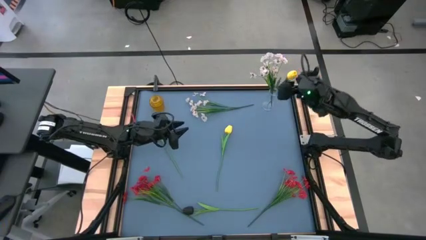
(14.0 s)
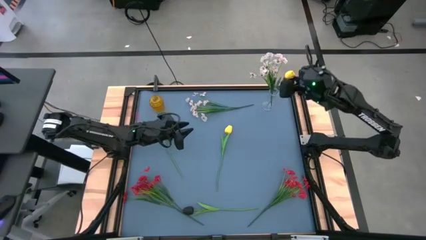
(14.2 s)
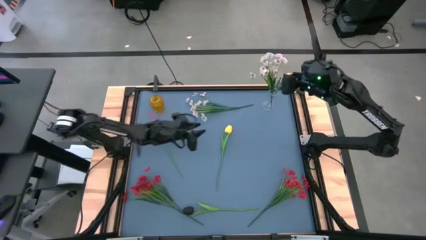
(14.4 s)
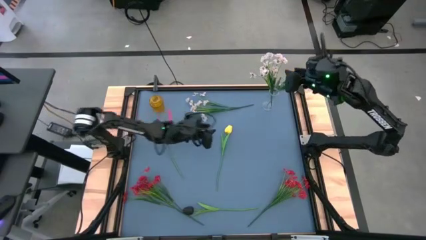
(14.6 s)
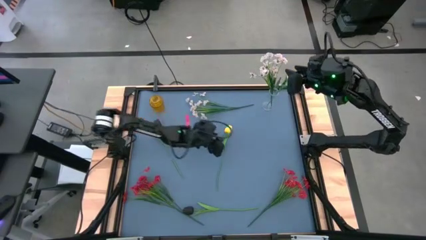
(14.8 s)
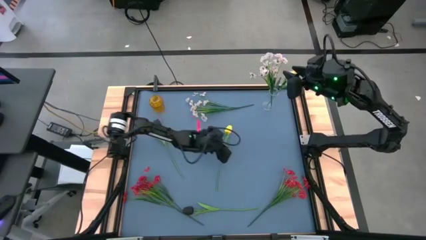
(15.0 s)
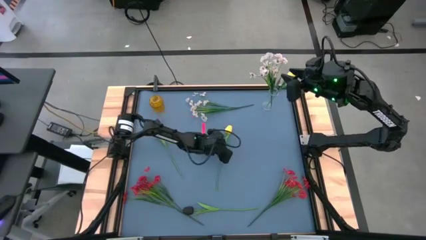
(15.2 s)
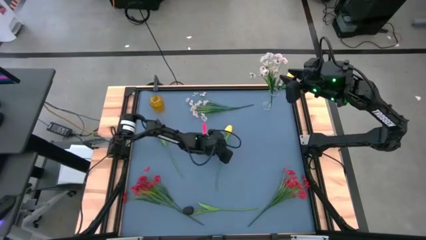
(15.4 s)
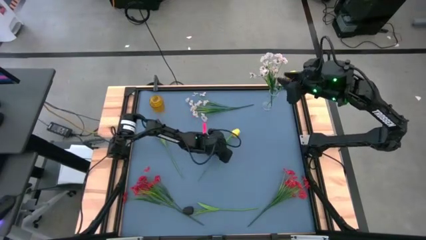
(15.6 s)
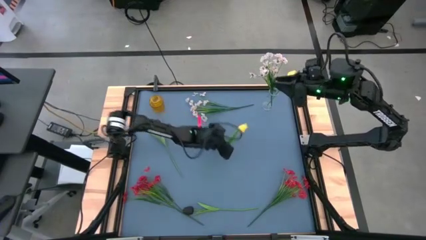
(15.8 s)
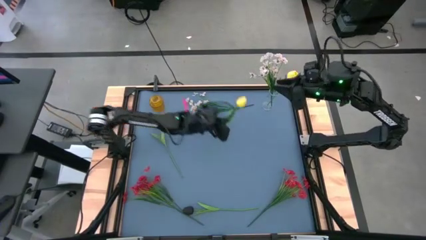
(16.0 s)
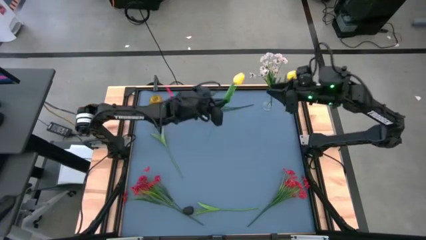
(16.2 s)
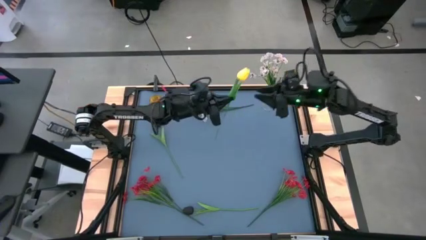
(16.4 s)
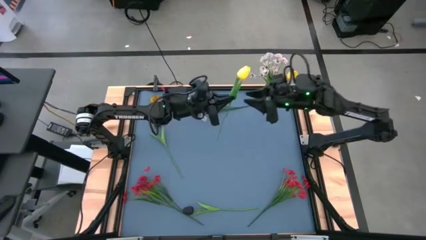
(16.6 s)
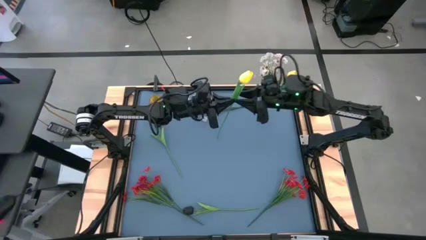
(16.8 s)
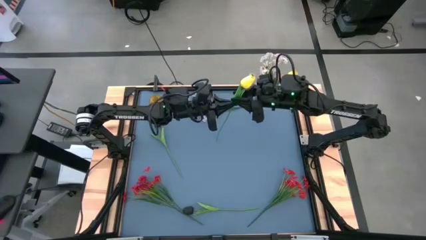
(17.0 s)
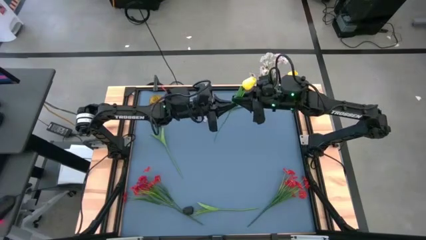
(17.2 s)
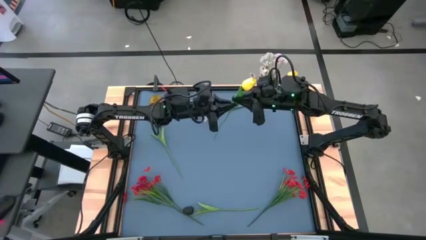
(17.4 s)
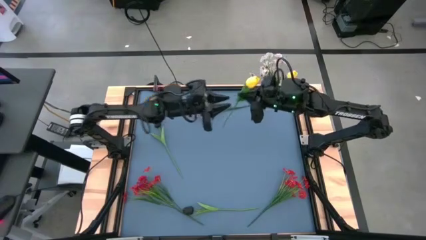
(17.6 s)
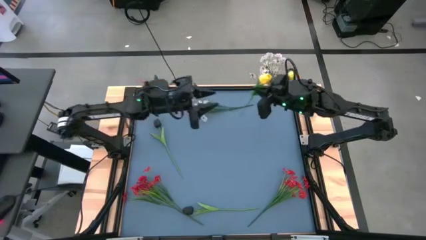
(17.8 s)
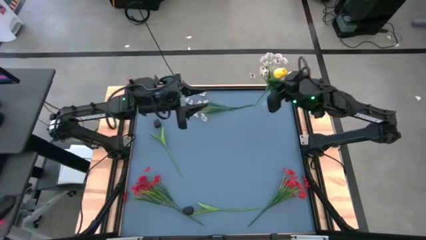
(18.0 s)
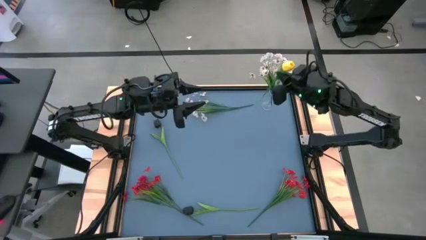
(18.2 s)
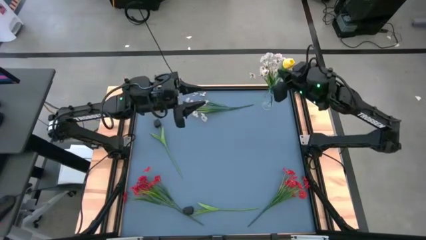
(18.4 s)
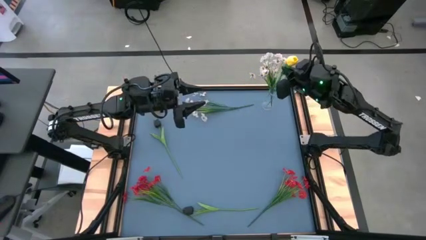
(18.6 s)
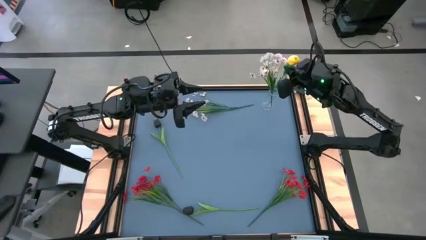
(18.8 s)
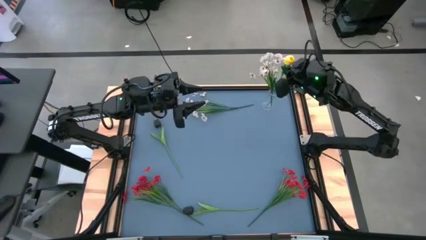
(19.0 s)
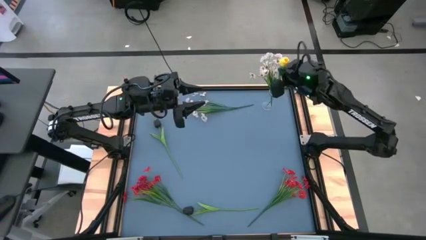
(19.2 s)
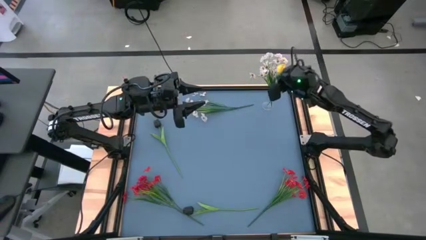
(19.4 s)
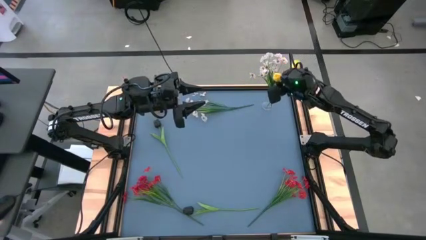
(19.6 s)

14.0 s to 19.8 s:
Task: Sort flowers into vase by color
Put the yellow tulip into the transparent vase

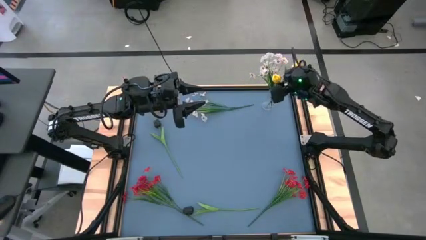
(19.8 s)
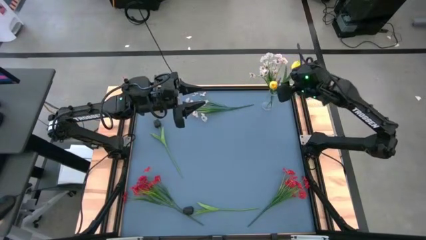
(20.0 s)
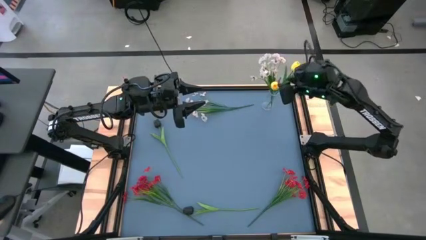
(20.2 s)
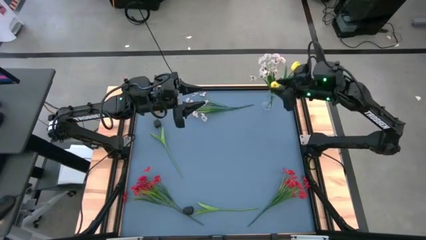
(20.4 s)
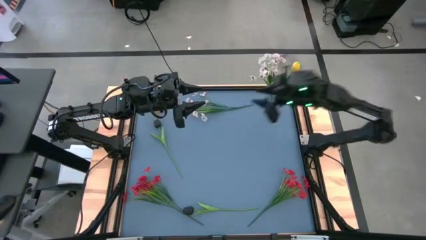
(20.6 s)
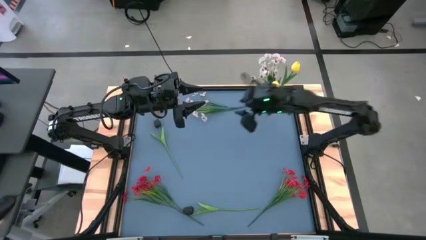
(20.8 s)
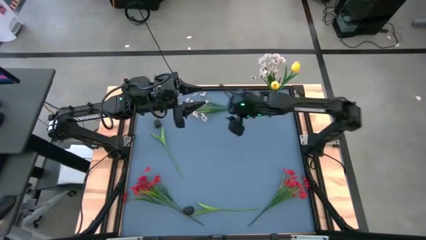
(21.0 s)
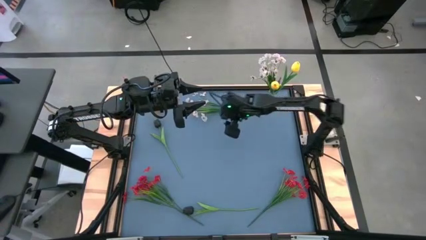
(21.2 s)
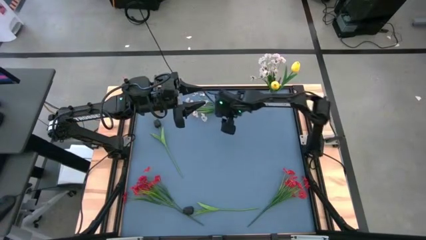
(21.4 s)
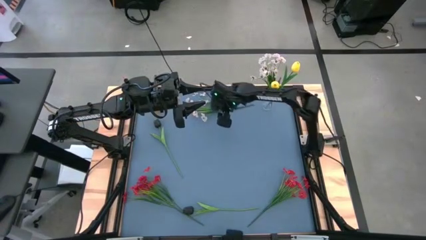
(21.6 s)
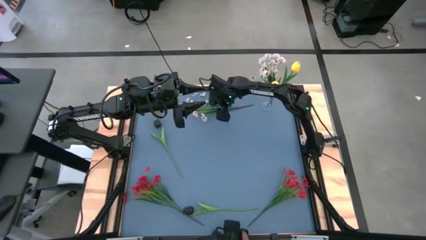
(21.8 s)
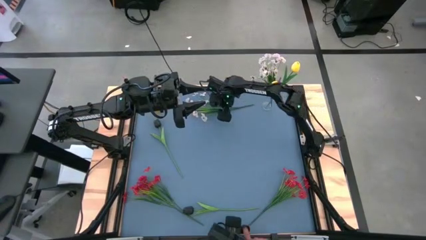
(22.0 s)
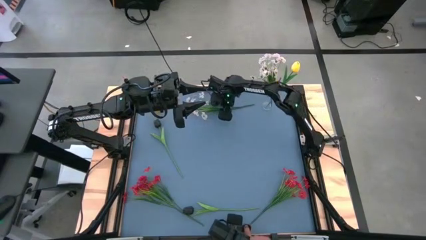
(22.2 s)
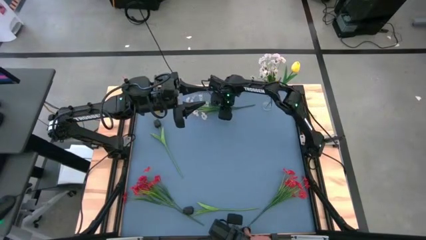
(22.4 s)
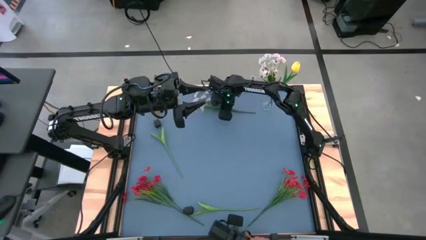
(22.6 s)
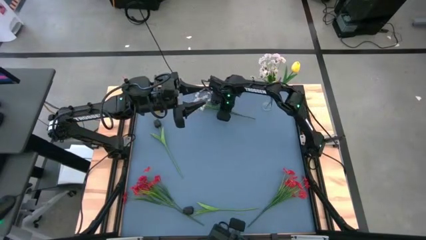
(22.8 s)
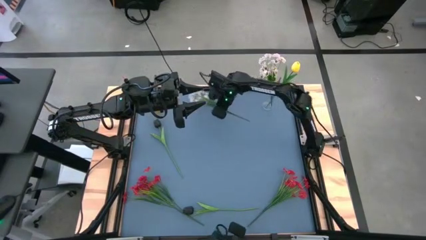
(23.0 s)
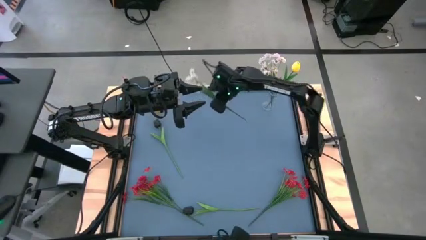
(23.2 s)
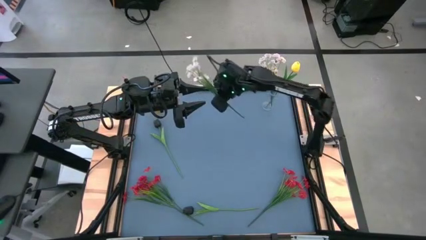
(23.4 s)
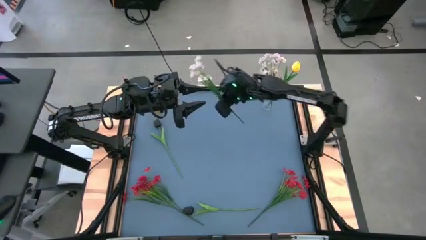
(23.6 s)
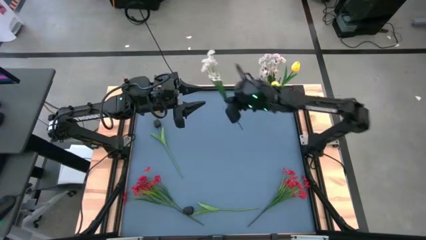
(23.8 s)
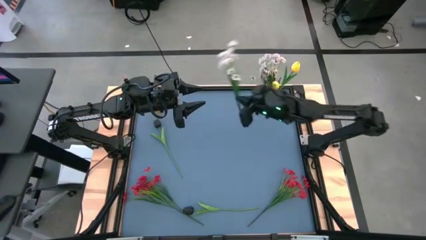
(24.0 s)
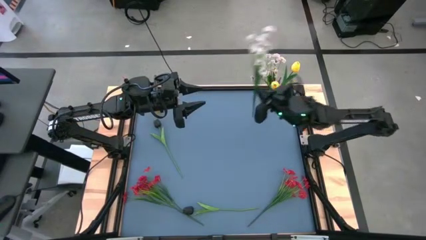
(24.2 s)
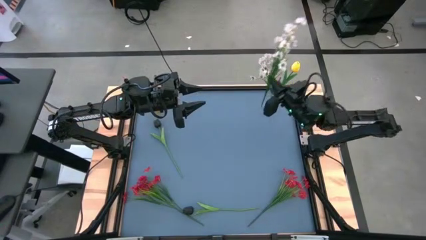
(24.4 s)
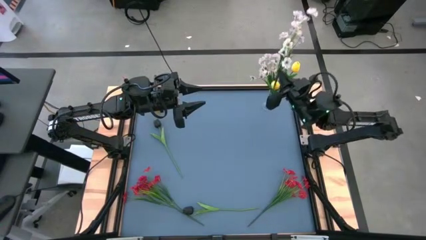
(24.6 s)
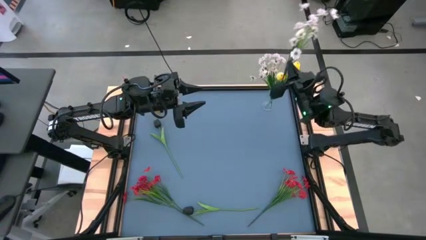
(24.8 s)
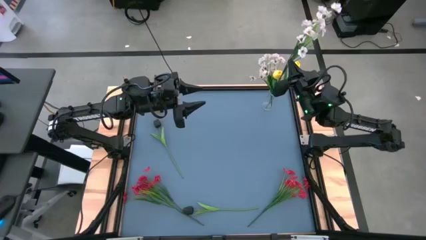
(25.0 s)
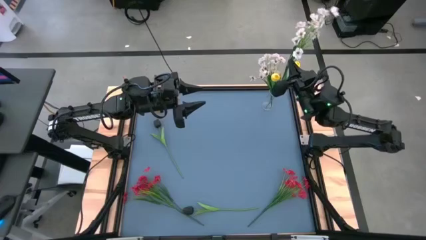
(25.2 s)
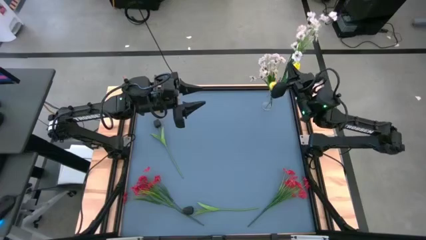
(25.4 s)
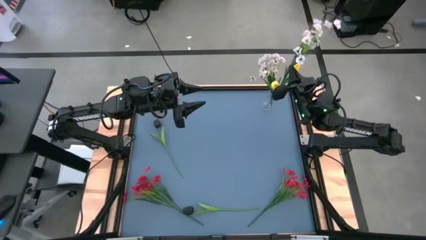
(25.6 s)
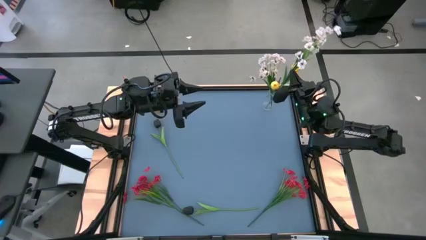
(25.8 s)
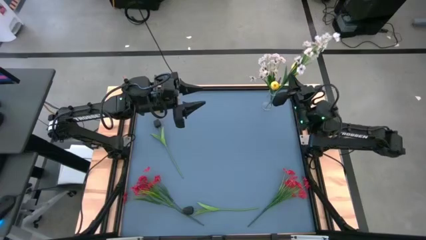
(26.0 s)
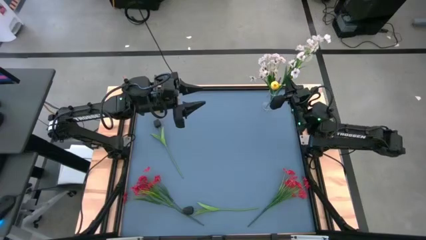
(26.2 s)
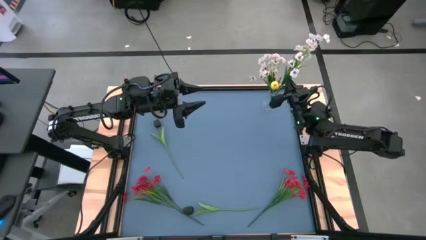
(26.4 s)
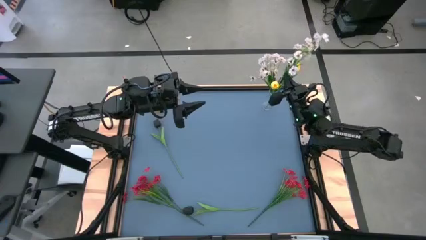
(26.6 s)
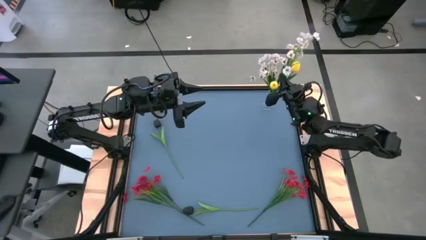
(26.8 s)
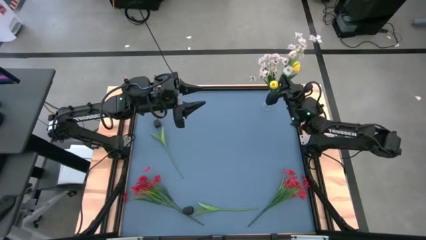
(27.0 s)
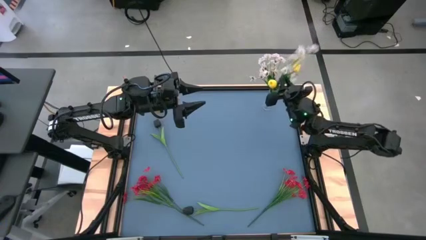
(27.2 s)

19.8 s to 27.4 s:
Put the white flowers into the transparent vase

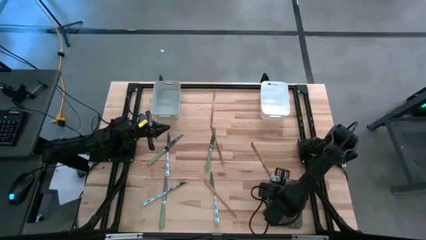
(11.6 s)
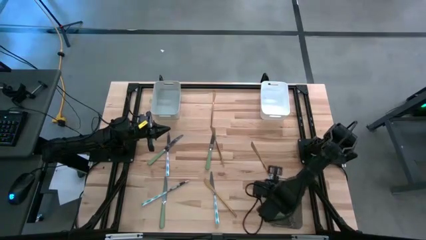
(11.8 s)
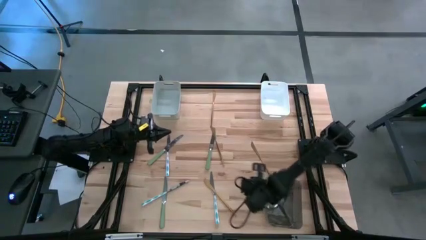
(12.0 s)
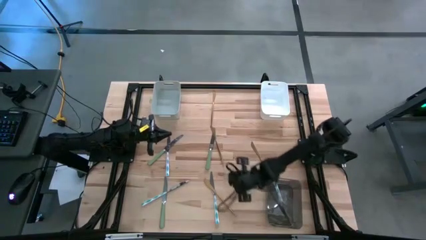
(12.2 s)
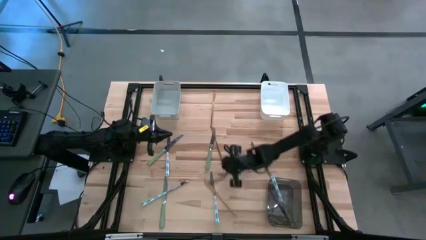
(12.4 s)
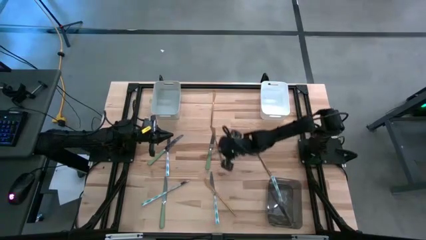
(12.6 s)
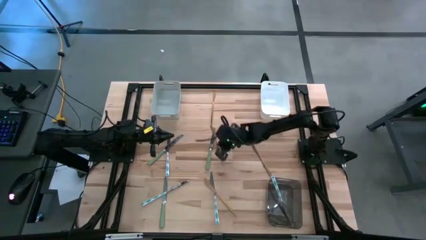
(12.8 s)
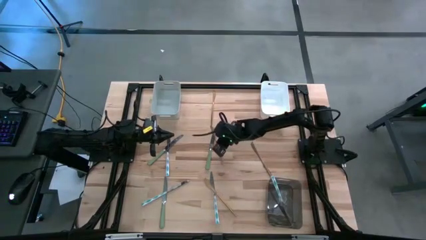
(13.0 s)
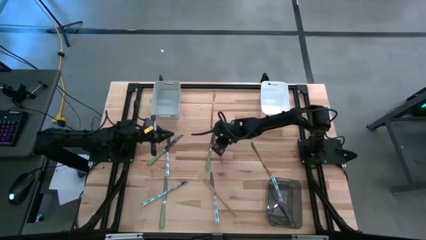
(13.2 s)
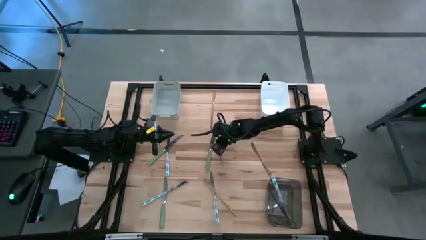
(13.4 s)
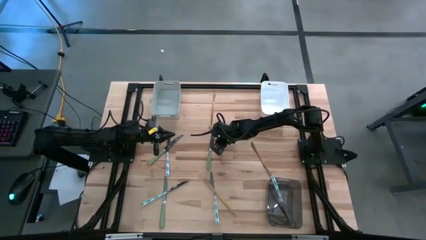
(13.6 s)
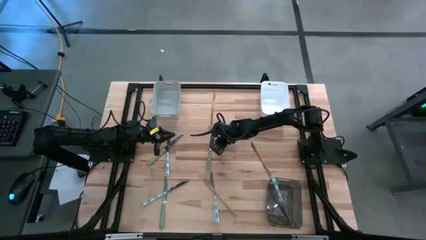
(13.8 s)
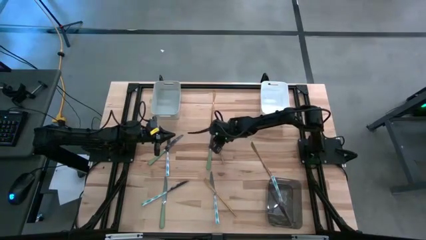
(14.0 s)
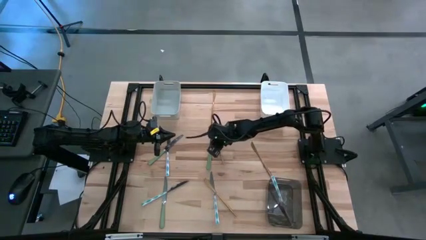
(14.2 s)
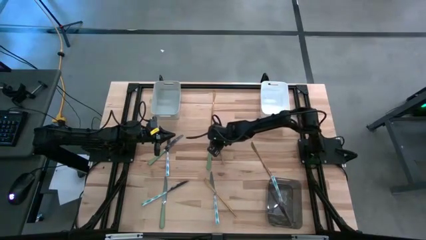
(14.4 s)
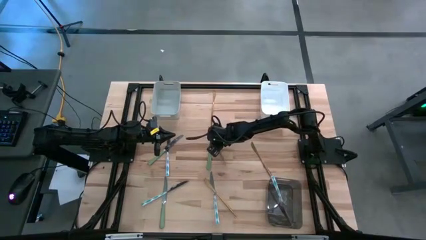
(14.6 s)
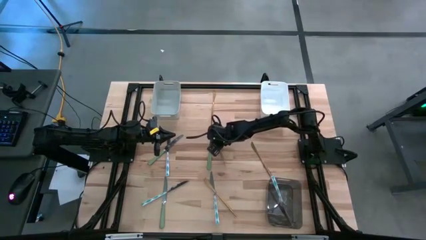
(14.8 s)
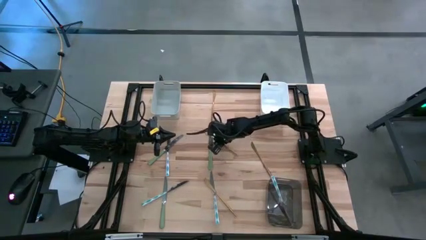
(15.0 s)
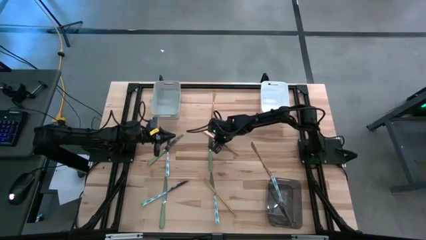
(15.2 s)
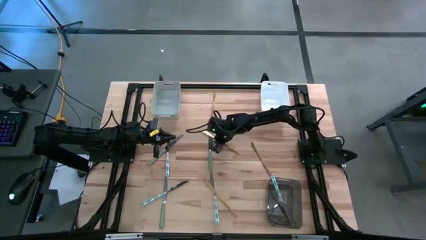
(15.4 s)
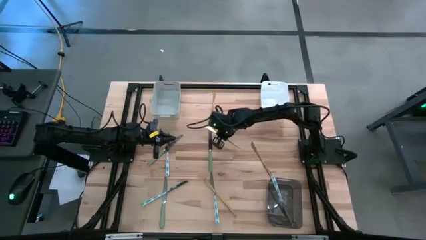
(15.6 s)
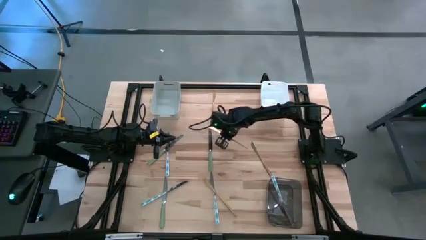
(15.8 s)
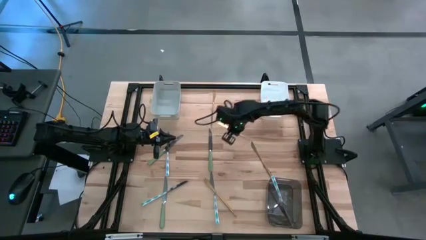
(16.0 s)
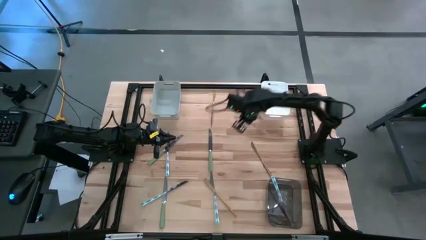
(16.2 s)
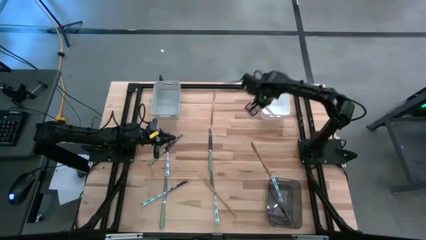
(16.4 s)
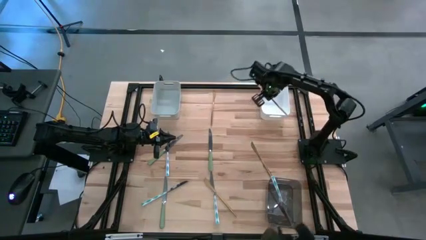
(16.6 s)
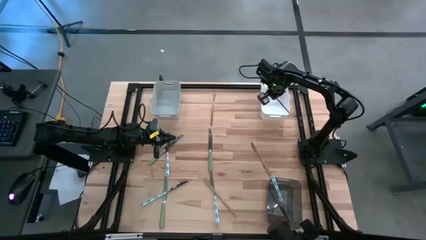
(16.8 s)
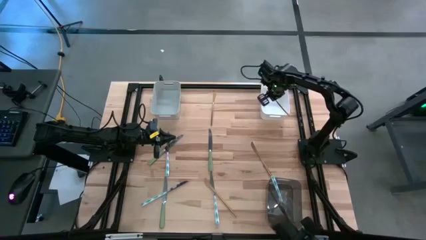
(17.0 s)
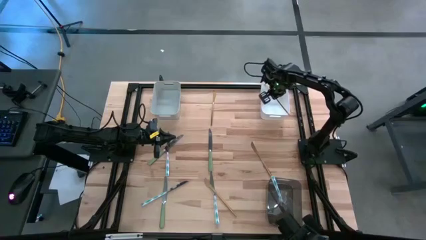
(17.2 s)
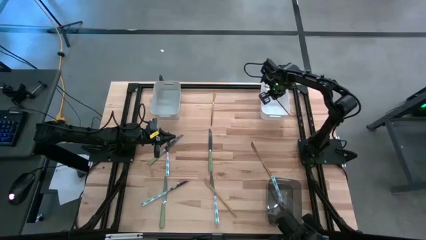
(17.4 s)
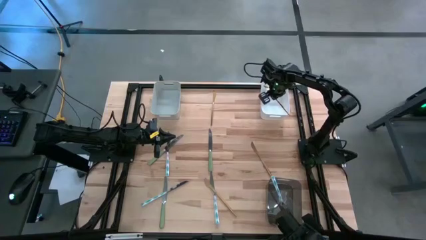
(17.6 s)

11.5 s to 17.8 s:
Task: Sort silverware by color (type)
Put the middle yellow knife into the white bin
